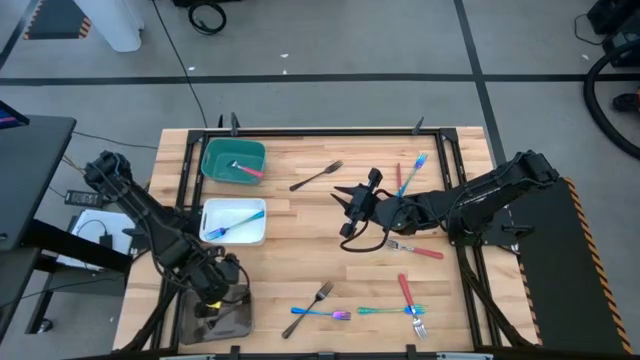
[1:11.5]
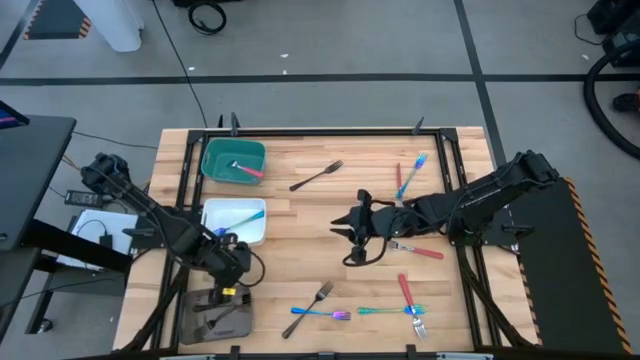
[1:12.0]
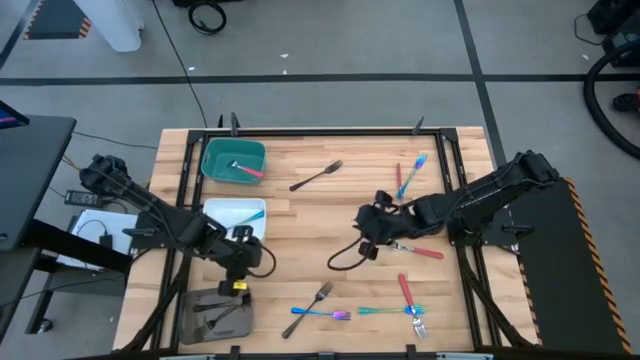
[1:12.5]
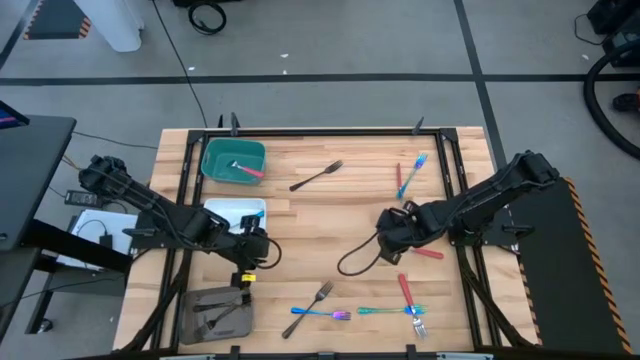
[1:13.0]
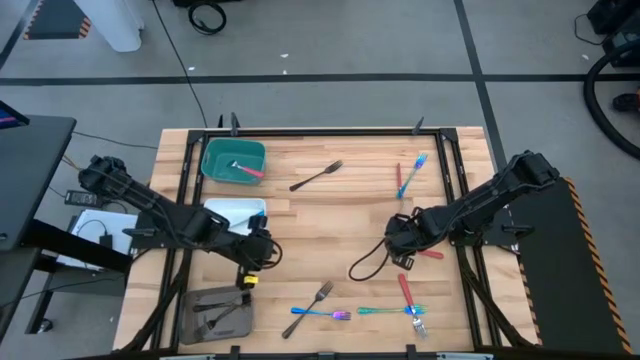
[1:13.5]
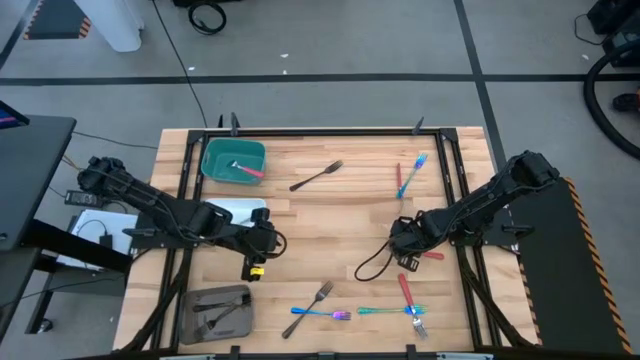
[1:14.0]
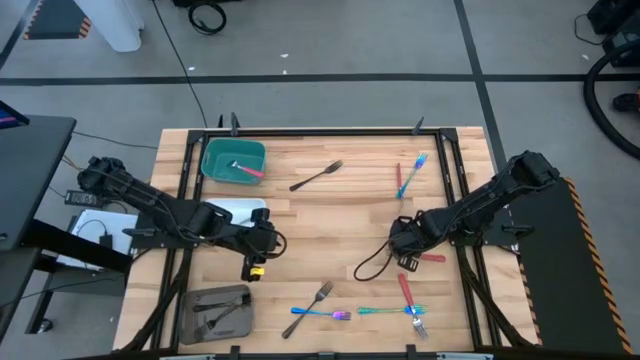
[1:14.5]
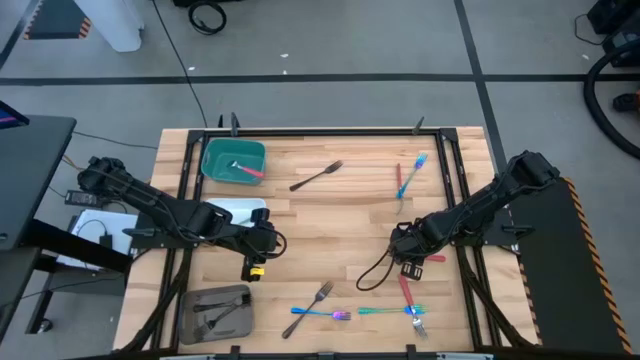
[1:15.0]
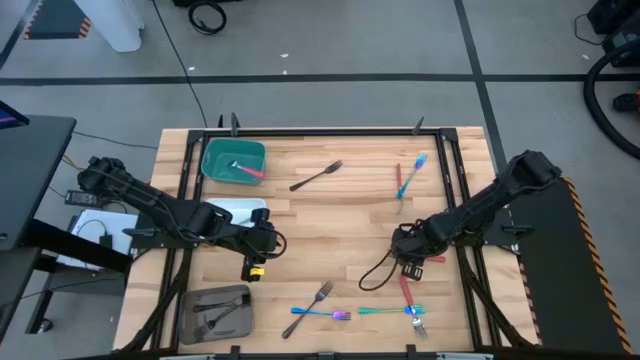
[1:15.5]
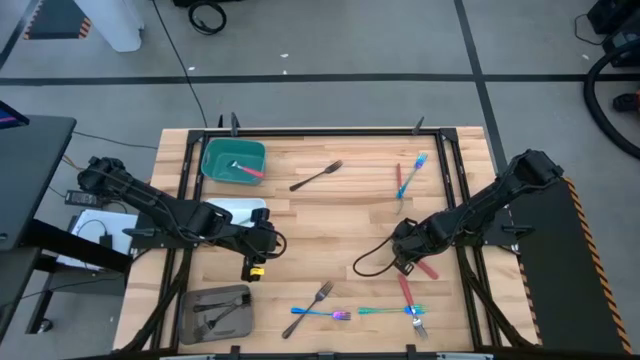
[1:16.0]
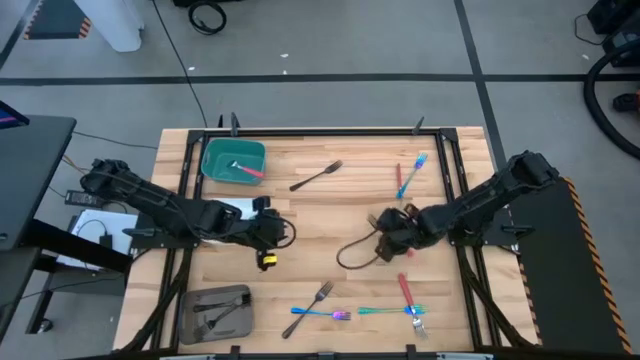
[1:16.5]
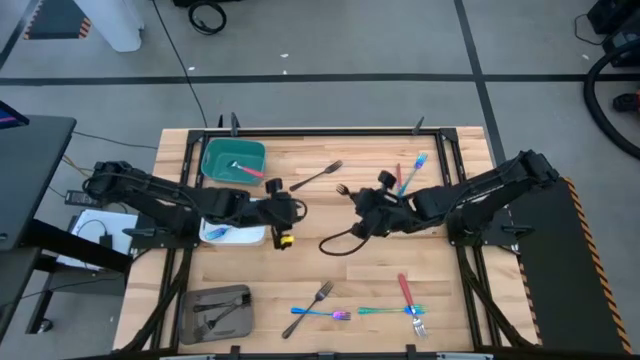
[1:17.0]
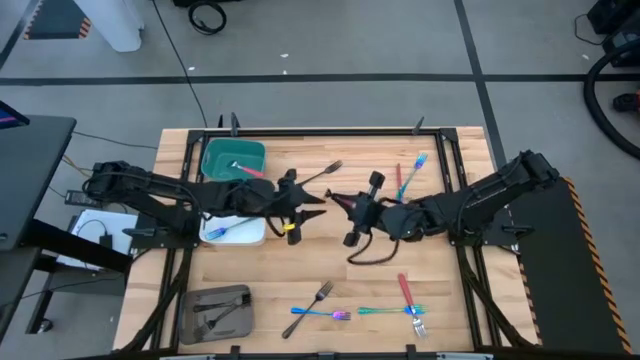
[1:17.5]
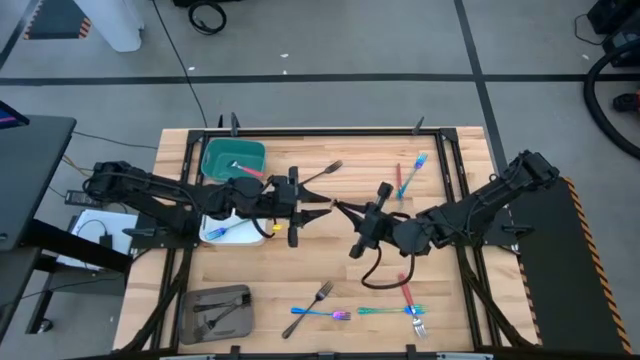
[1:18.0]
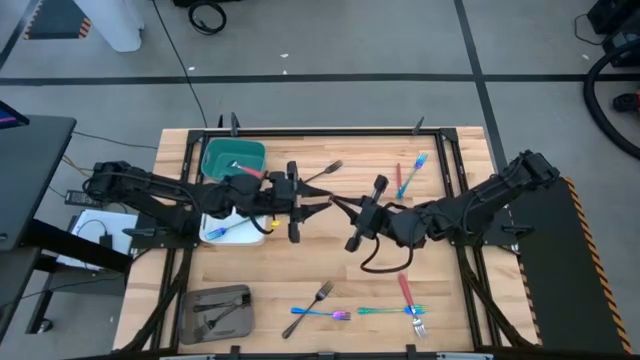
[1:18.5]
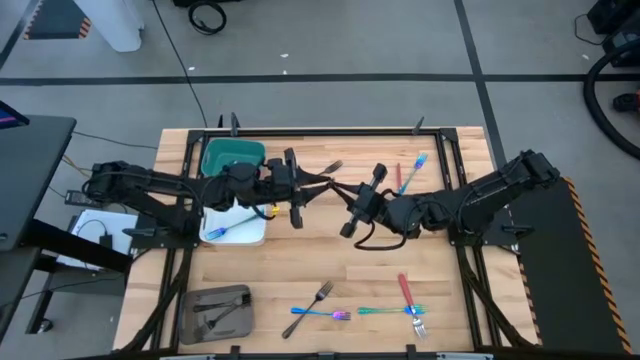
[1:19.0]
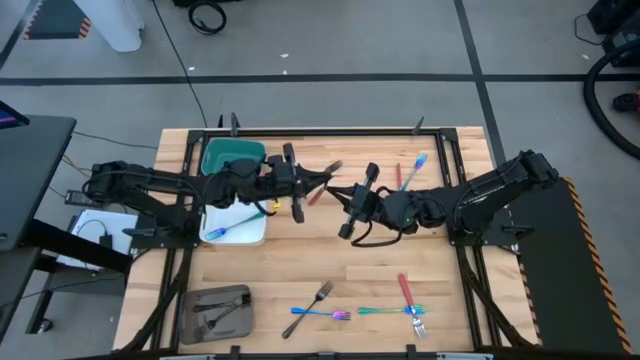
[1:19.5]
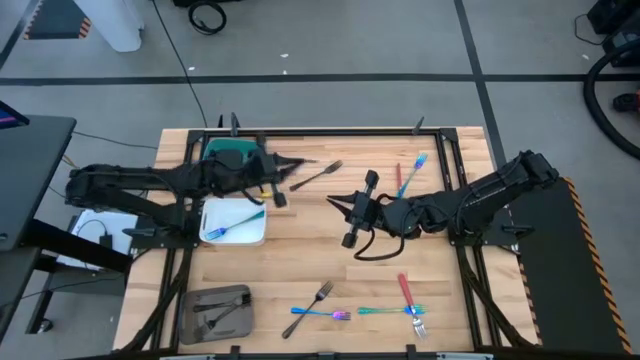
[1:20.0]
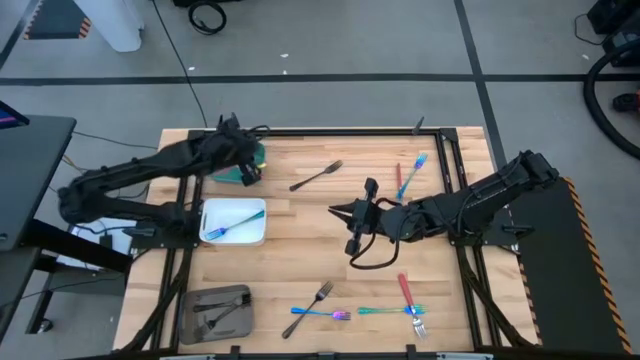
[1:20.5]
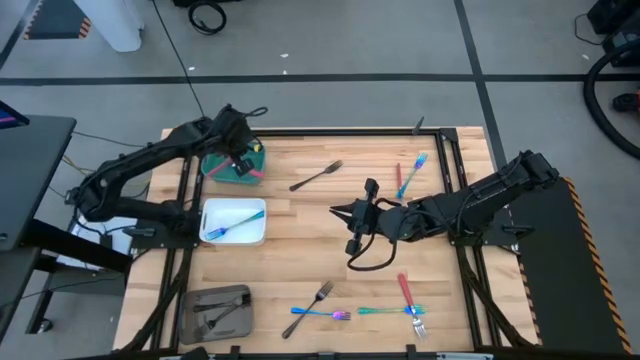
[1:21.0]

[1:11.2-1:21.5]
Task: Sort silverware by color (type)
Put the pink fork into the green bin

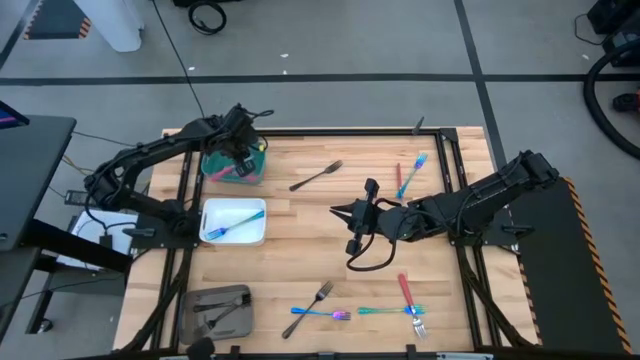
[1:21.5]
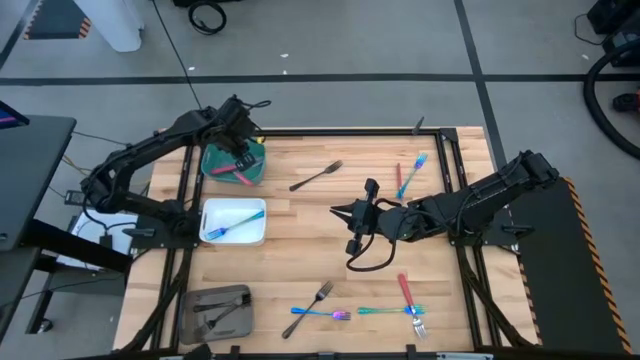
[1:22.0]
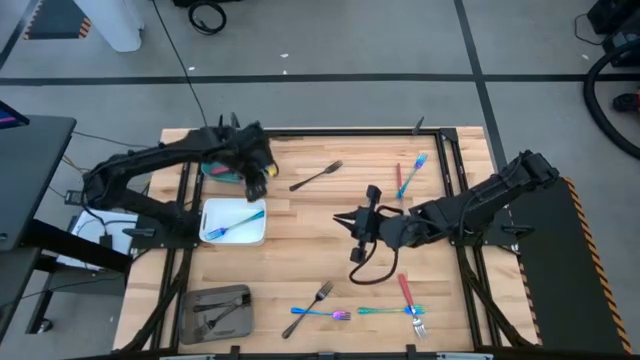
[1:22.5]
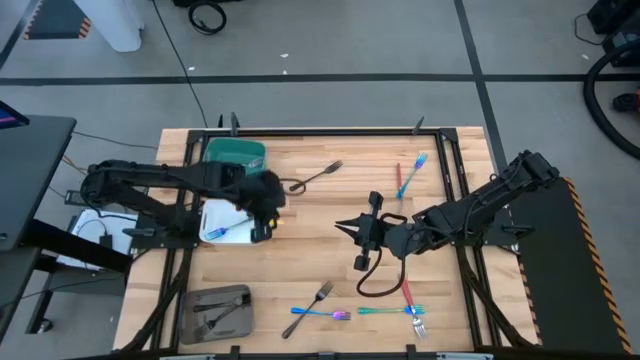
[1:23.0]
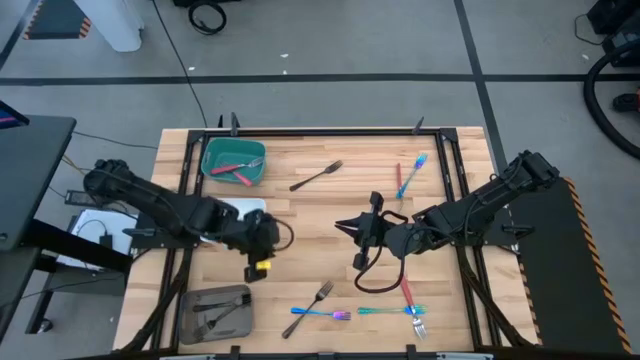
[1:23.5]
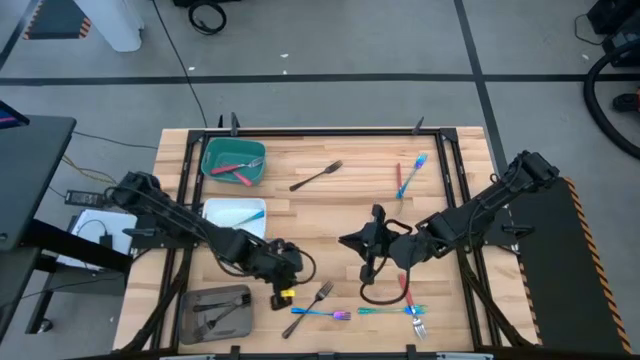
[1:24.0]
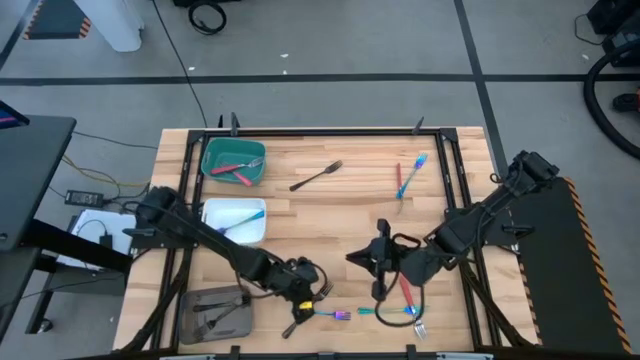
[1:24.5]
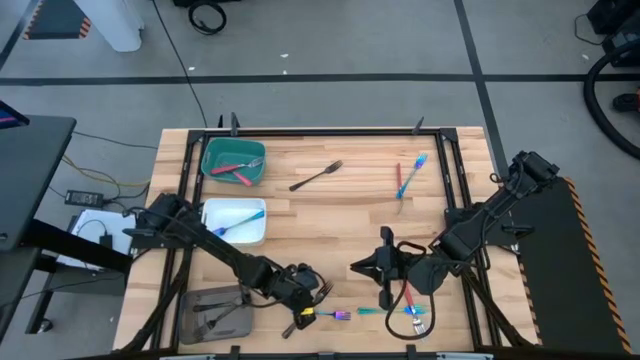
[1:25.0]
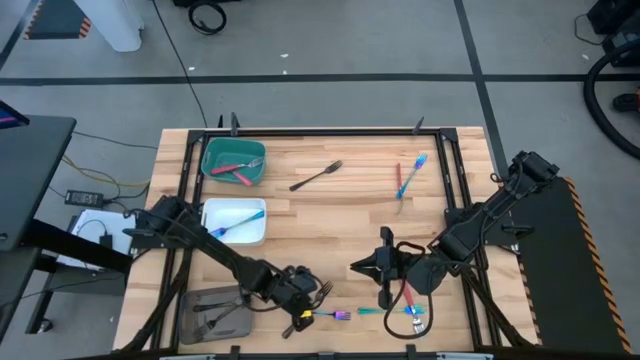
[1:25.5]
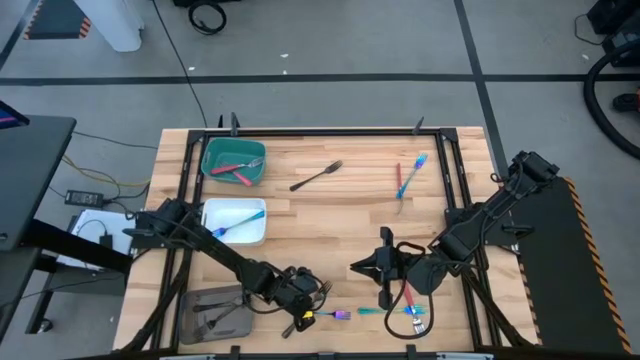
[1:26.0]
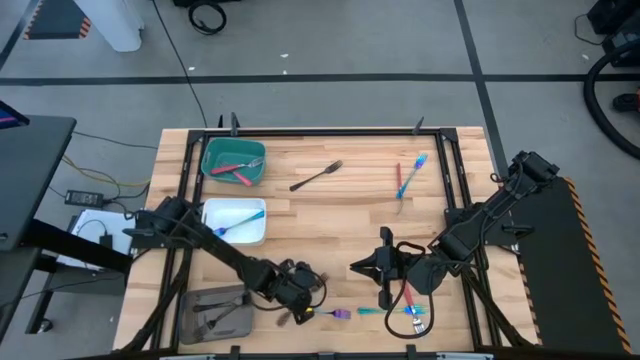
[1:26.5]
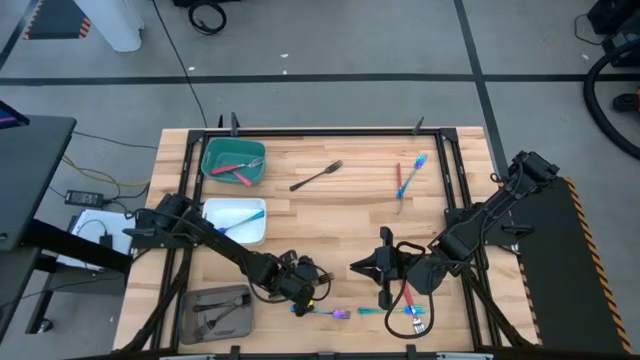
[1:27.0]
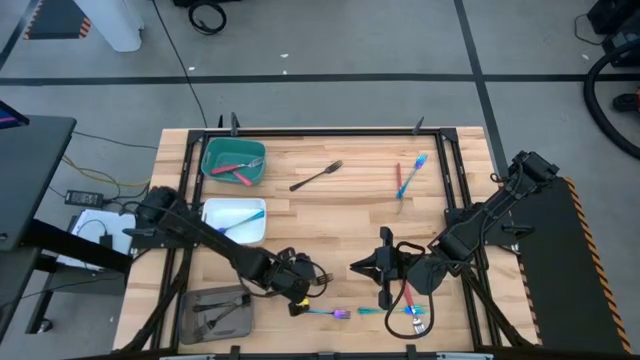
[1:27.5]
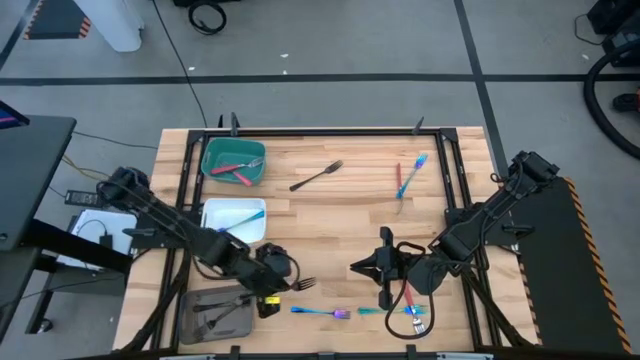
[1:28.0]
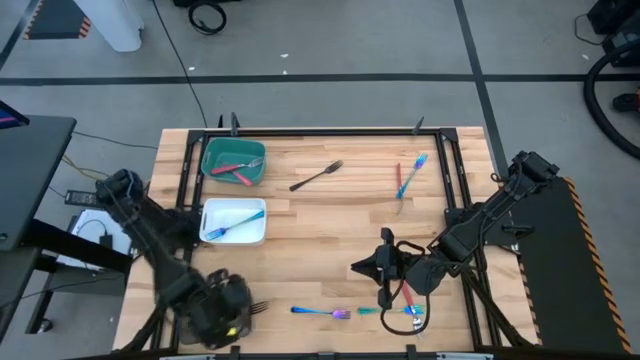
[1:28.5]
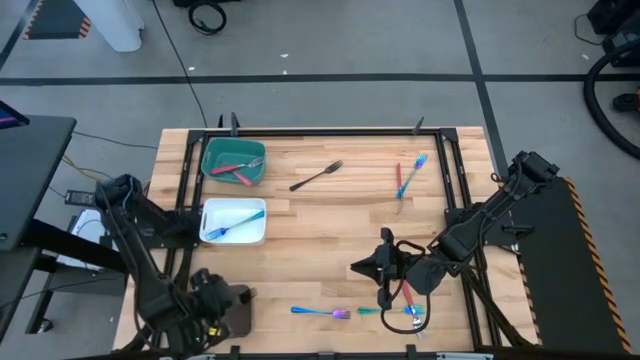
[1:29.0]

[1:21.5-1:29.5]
Put the black fork into the black bin

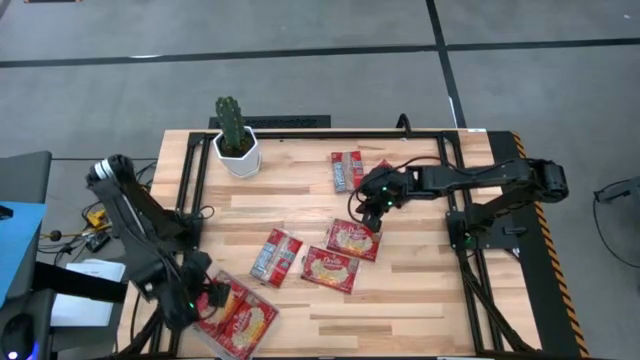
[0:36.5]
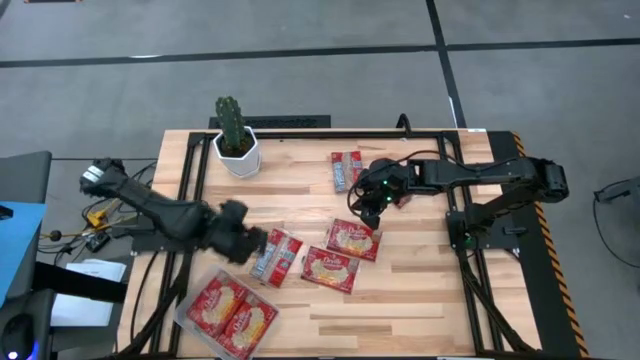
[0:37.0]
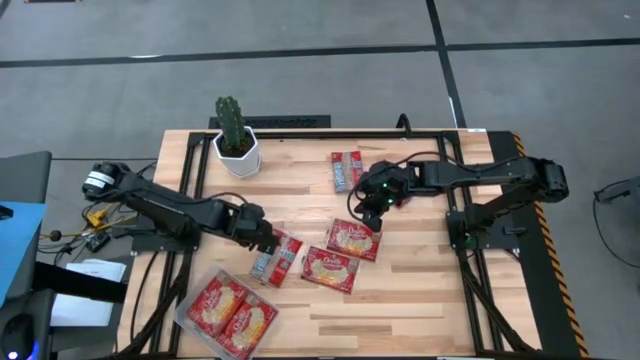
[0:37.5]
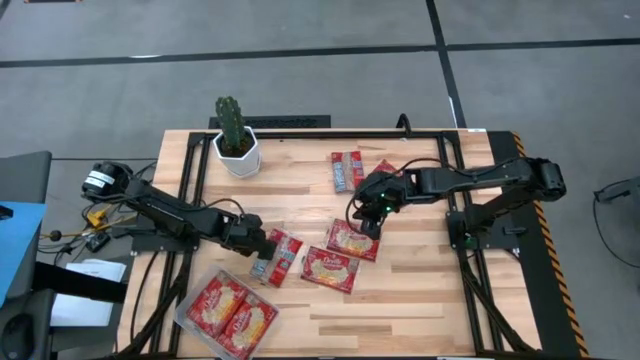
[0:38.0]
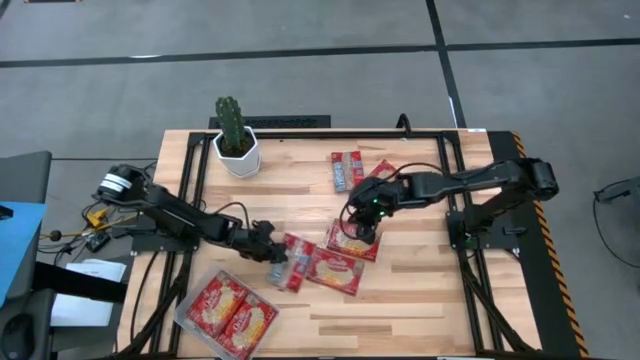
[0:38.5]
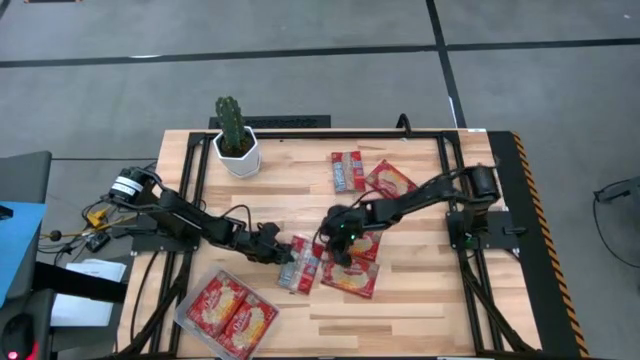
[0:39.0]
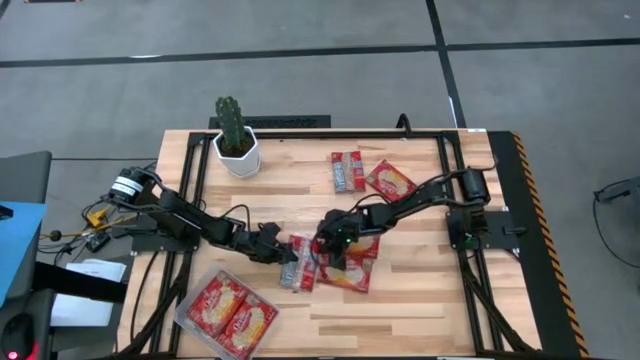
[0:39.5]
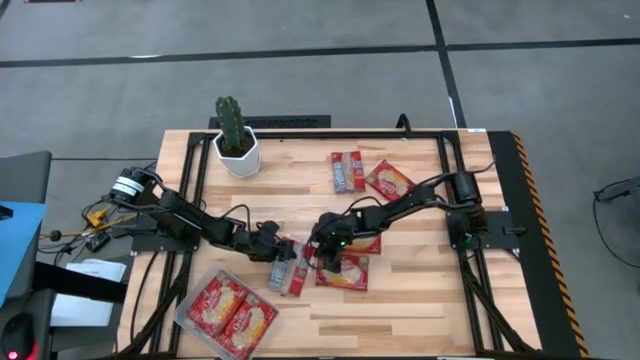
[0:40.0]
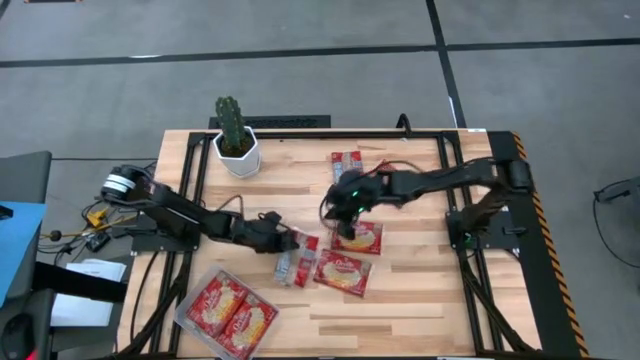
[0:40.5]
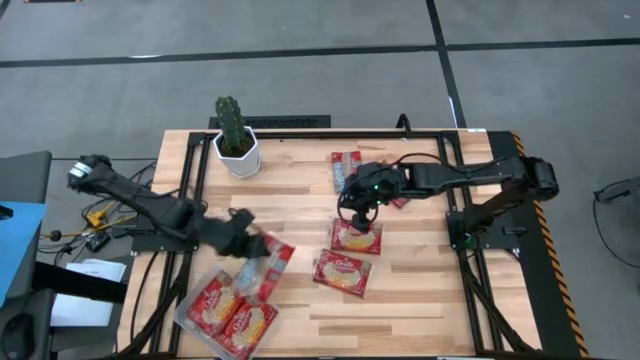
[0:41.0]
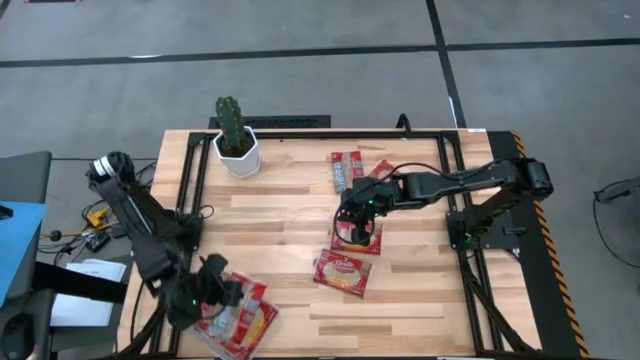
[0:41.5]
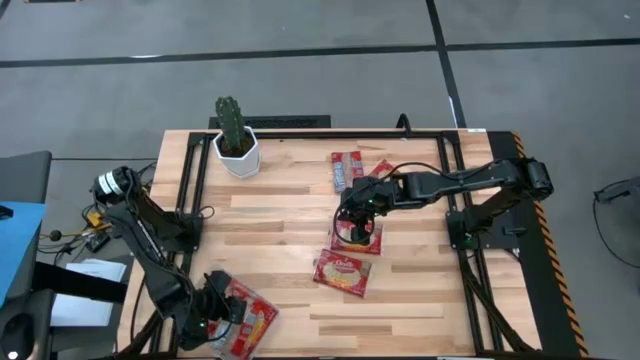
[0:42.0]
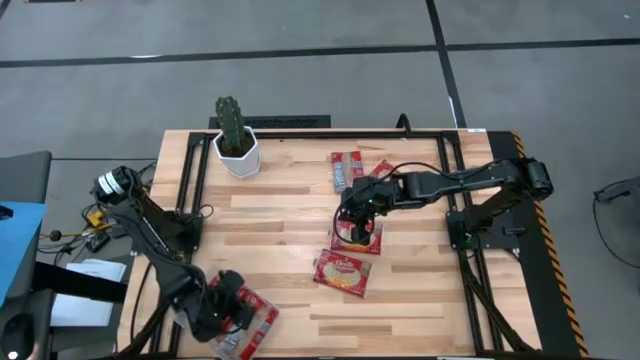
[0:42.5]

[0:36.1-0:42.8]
Task: Sort popcorn bags into baskets
Put the red popcorn bag into the transparent bin
